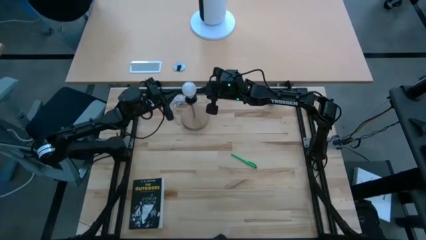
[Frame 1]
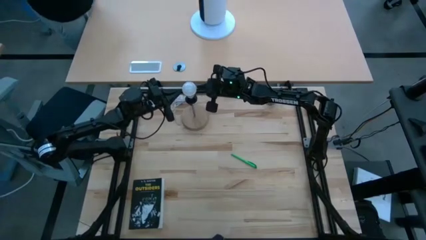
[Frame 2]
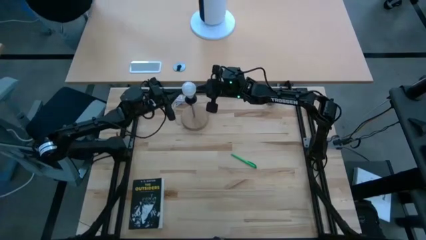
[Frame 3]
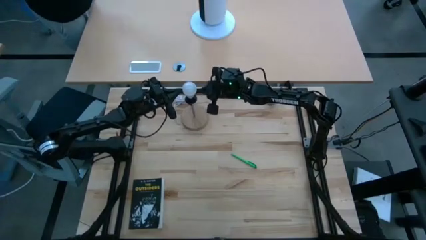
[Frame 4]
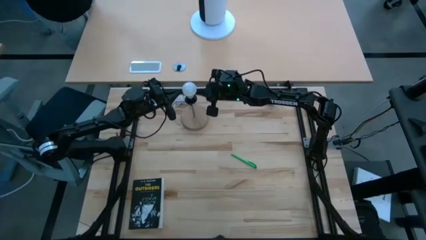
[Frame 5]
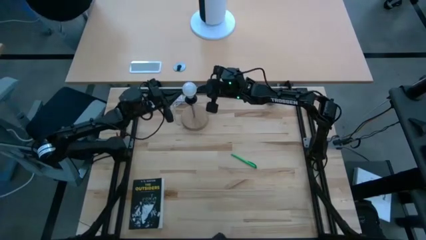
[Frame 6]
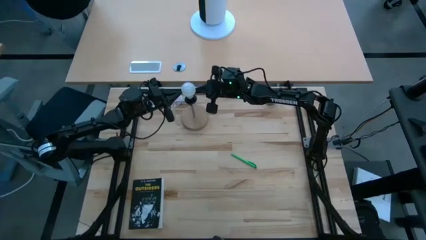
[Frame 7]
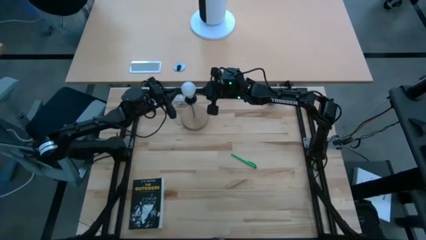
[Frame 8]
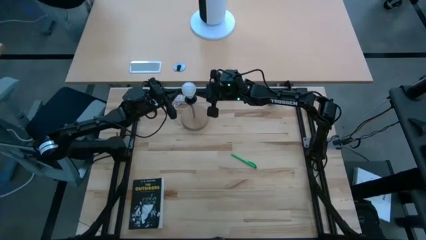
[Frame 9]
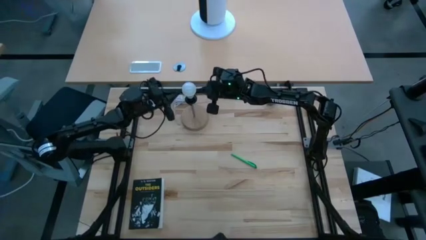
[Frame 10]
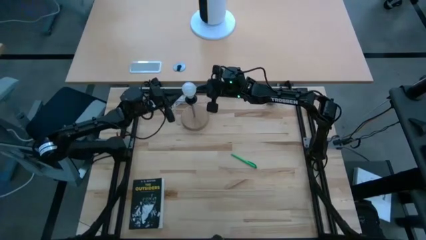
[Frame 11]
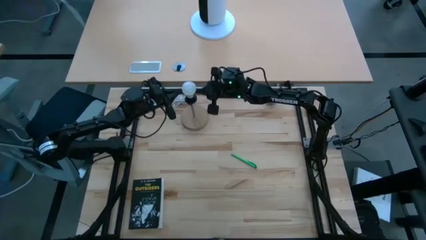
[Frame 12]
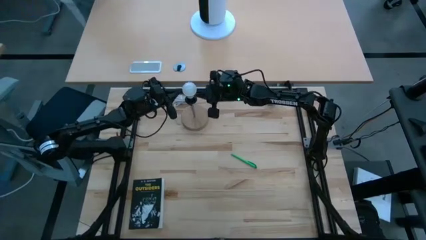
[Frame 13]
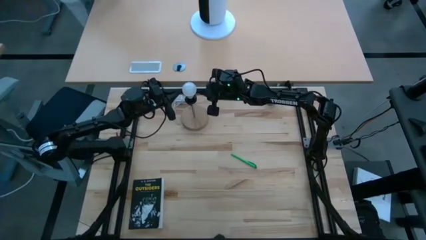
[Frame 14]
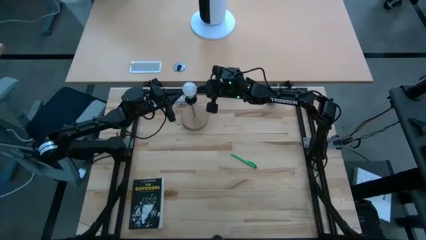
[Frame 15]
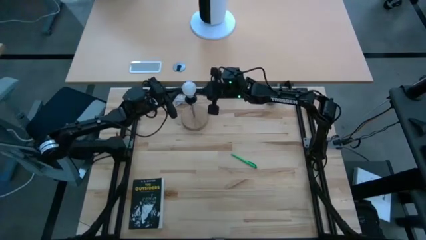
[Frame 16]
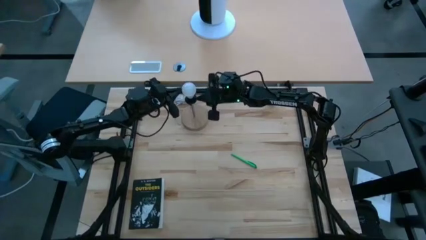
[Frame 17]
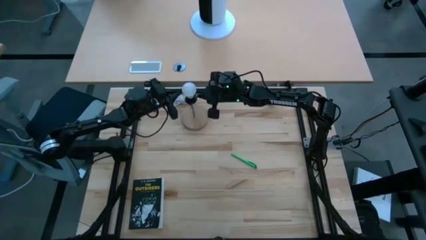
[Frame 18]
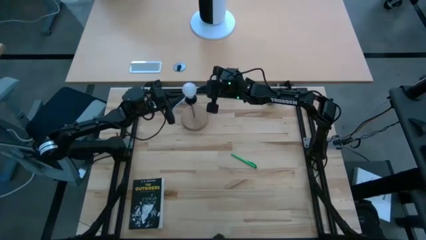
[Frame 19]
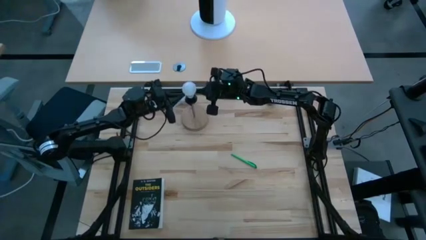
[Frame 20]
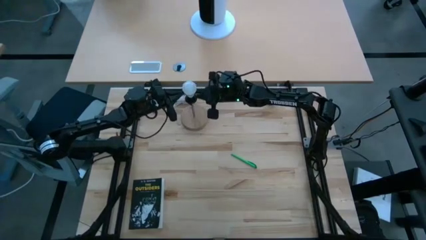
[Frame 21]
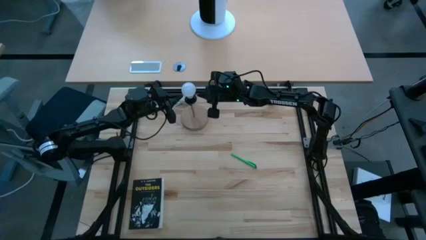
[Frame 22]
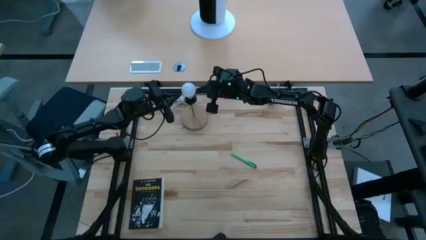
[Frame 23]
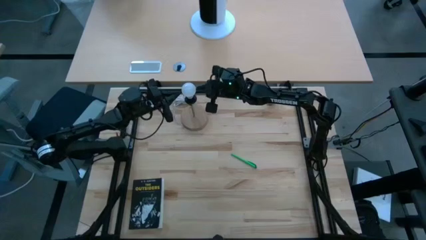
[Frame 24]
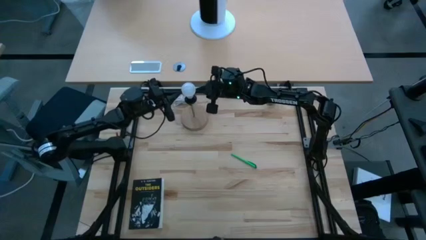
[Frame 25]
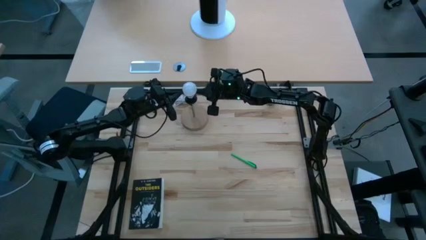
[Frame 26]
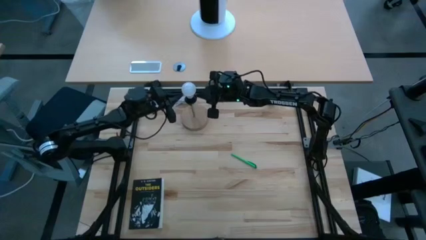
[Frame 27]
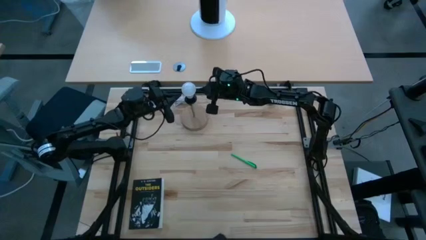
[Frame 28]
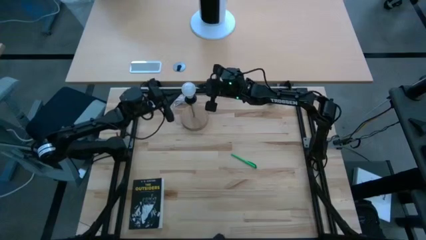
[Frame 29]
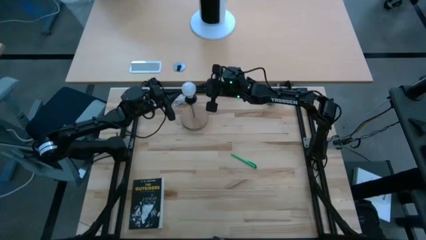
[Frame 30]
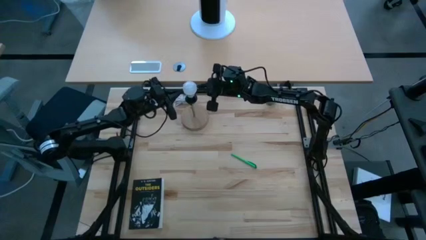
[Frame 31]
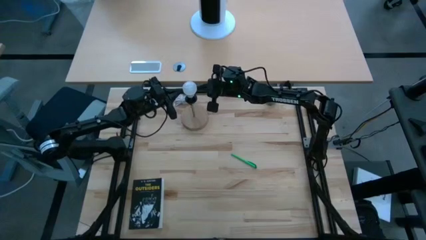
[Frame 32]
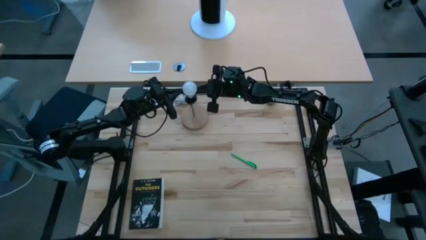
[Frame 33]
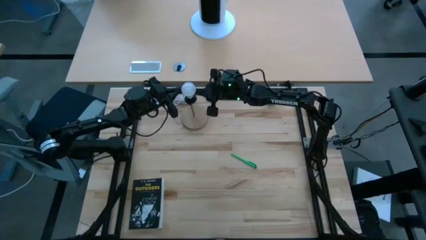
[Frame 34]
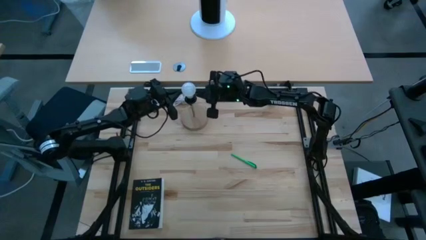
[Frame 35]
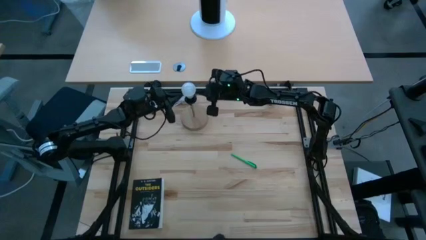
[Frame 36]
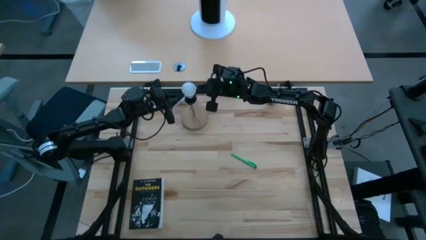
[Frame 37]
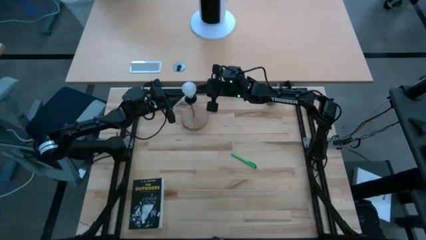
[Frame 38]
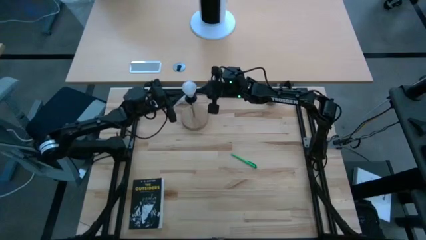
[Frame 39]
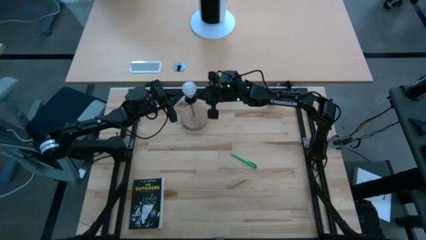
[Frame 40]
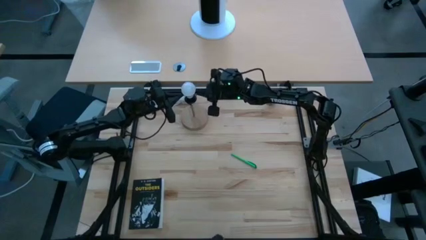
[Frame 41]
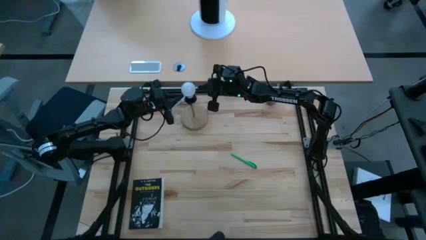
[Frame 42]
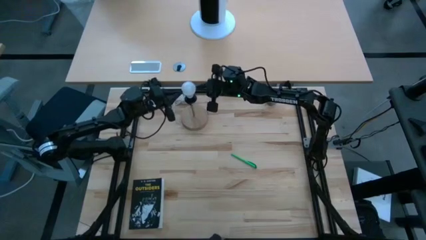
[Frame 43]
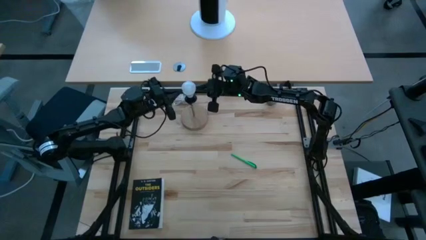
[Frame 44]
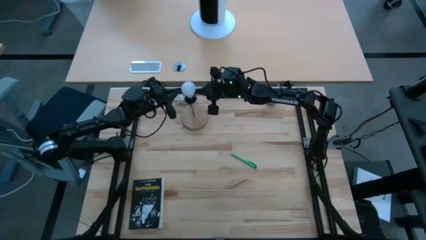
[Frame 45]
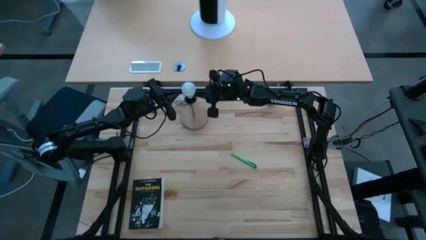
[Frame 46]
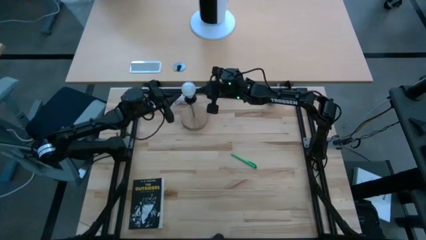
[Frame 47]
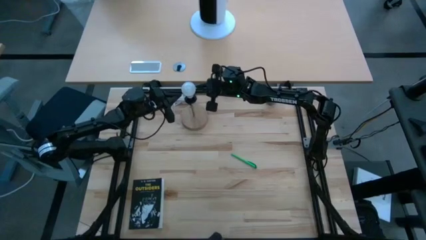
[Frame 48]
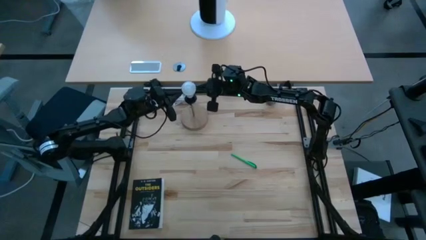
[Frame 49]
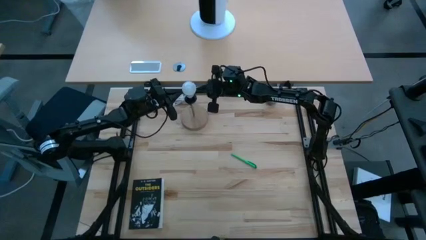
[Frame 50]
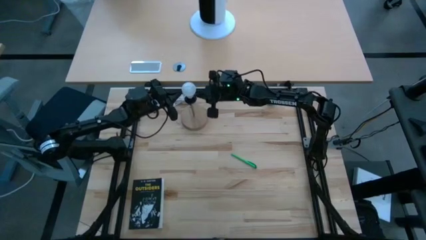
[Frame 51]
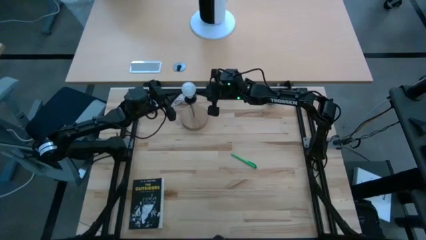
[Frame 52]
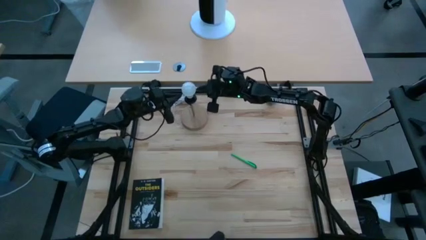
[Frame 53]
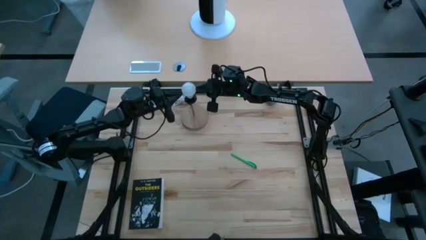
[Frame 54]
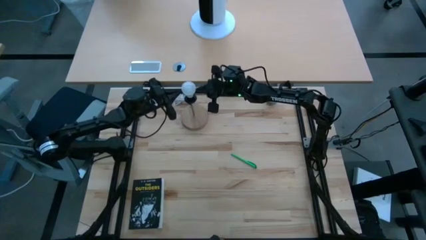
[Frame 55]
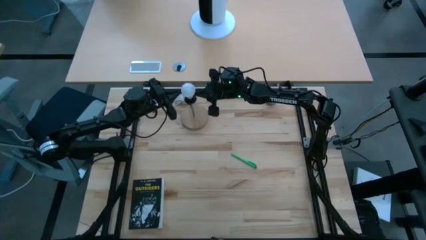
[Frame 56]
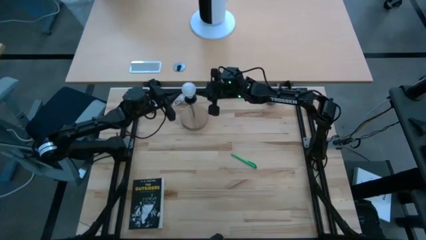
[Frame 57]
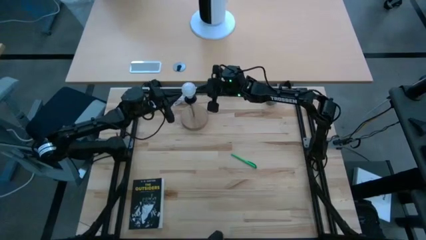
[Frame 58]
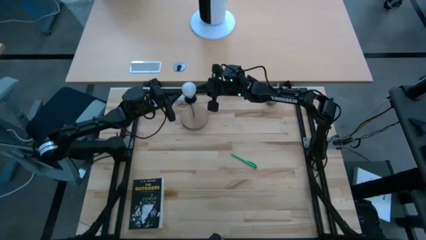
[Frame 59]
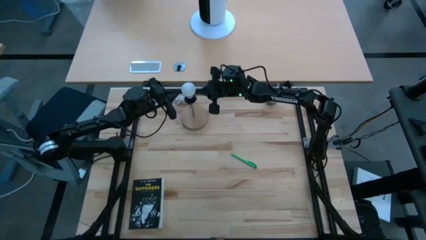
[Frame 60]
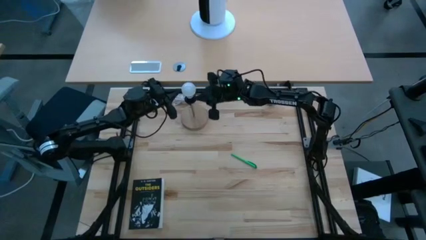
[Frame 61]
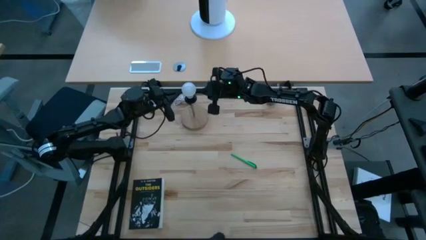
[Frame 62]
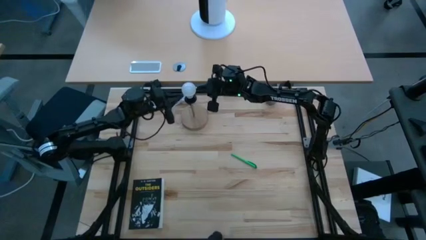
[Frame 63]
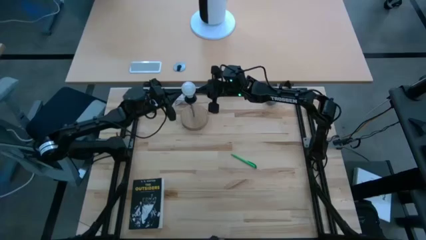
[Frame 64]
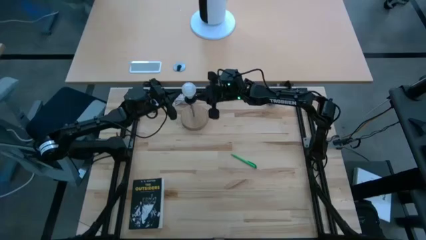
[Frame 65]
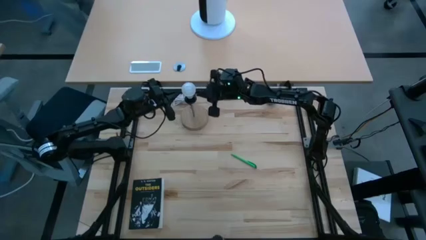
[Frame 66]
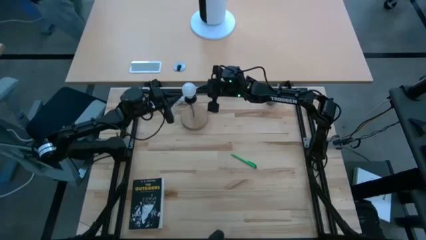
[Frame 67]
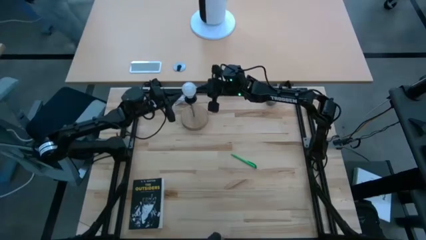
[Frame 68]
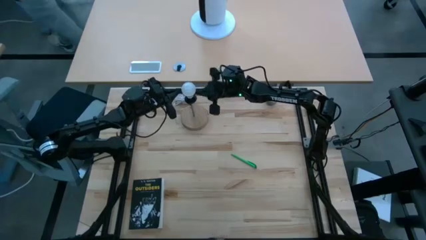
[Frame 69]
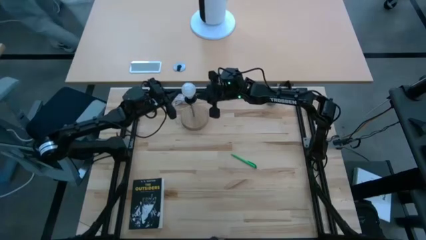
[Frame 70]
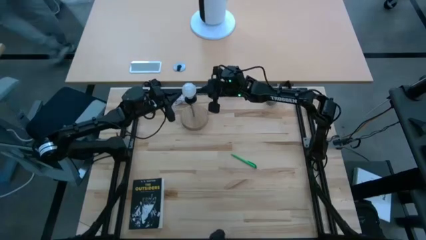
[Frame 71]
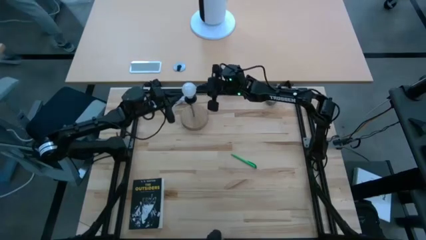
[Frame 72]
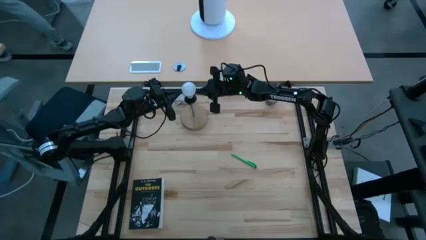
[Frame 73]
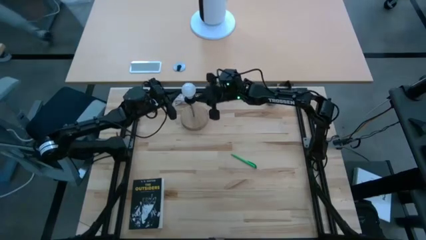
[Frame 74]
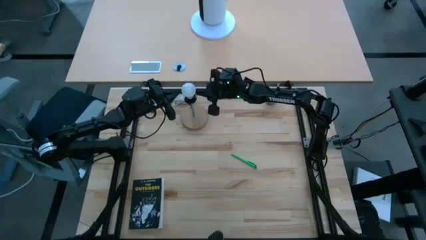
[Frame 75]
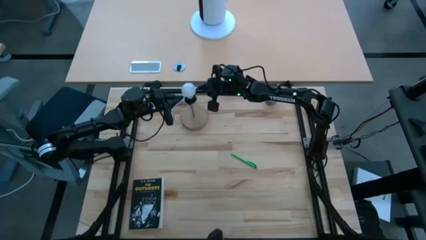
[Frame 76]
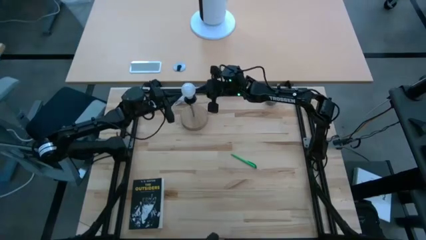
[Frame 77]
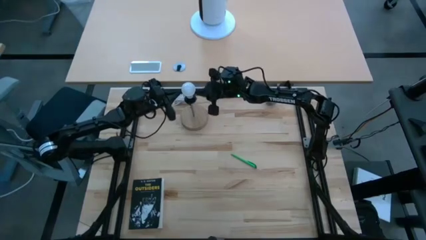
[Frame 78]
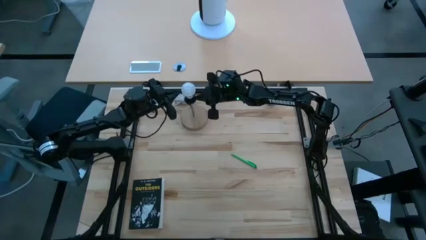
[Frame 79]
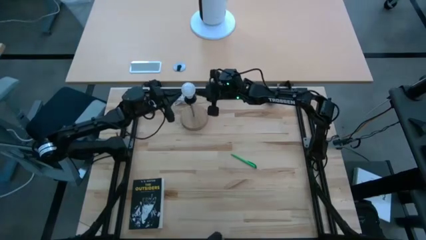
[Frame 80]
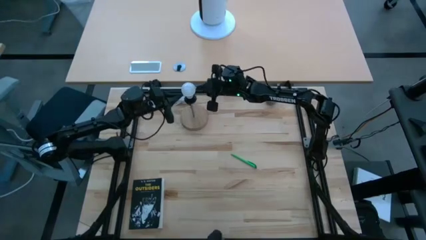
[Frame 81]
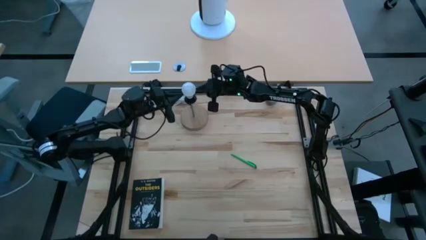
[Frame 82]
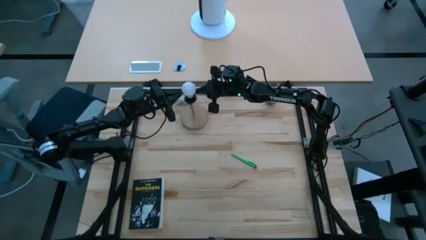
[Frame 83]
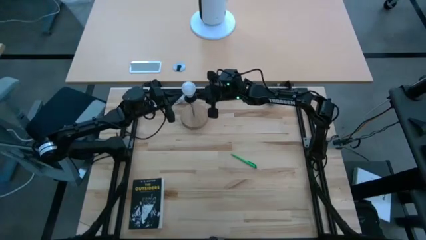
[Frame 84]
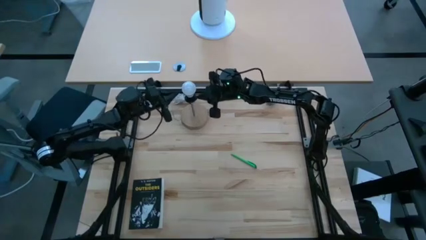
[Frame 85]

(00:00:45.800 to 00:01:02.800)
Task: Screw lightbulb
Insert the lightbulb into the lamp
